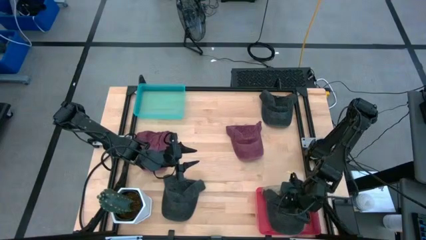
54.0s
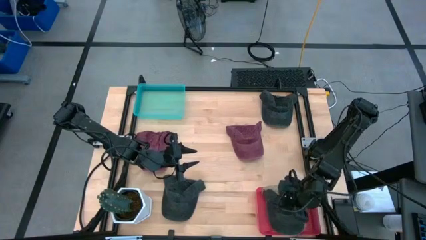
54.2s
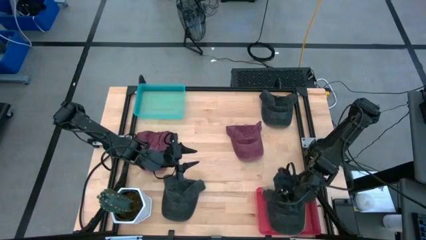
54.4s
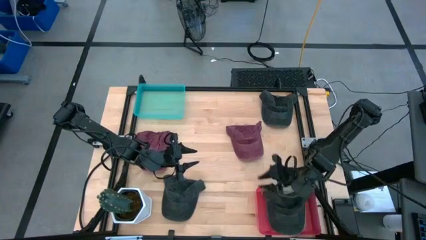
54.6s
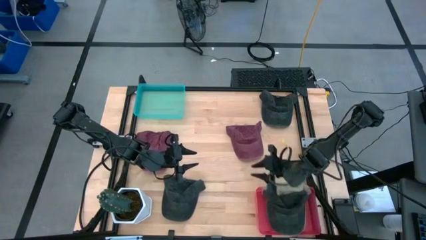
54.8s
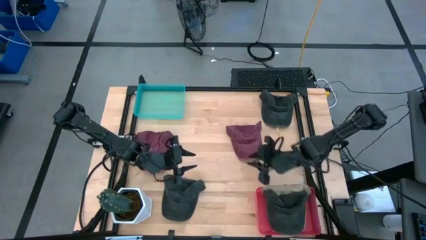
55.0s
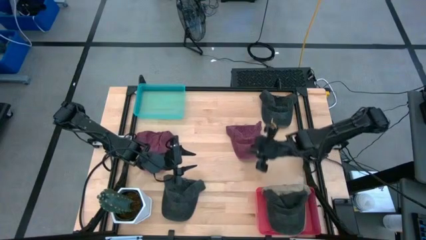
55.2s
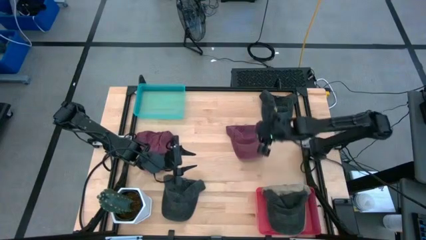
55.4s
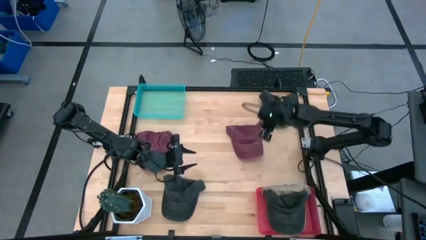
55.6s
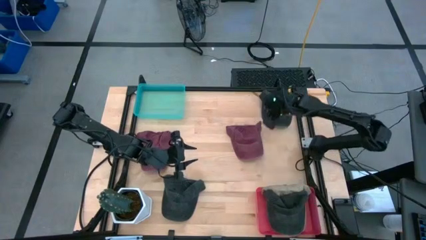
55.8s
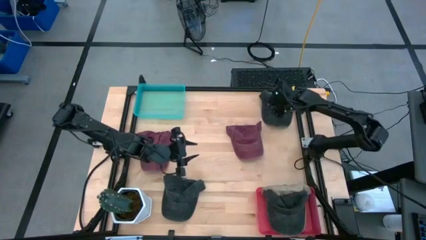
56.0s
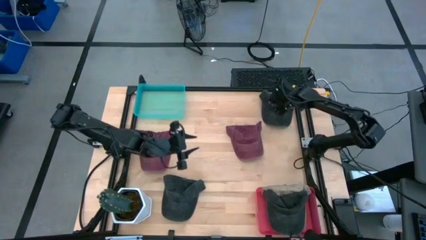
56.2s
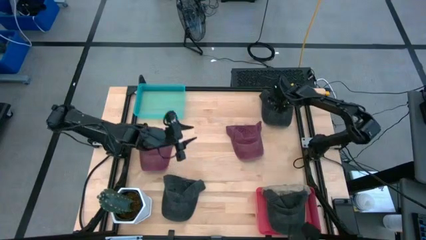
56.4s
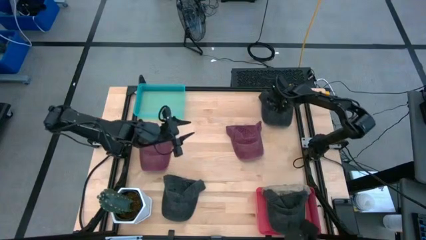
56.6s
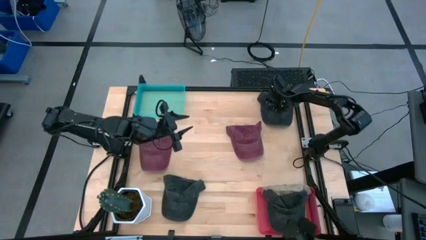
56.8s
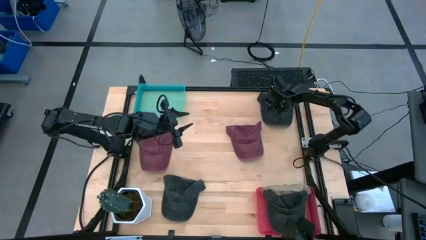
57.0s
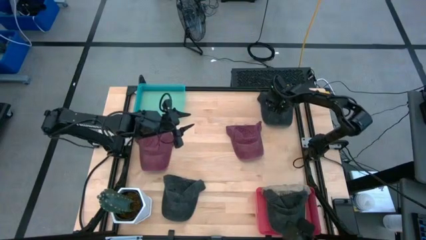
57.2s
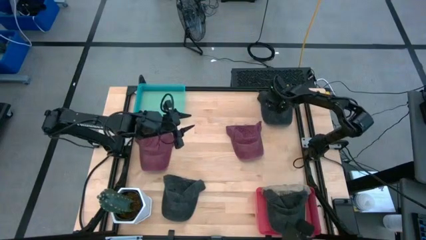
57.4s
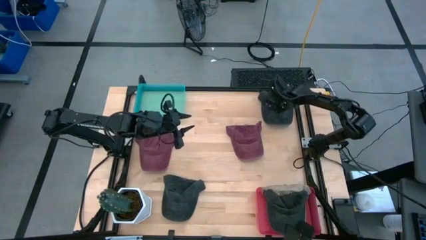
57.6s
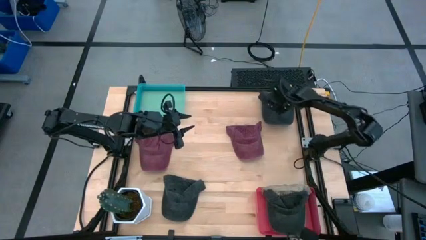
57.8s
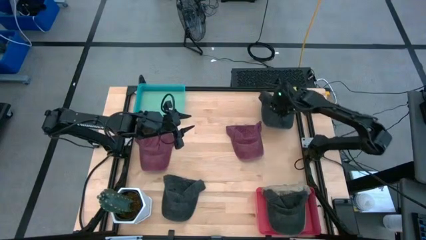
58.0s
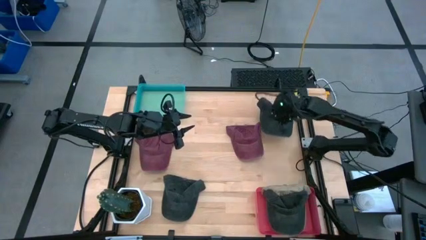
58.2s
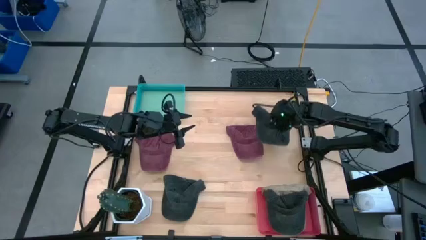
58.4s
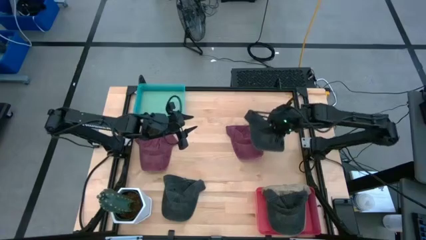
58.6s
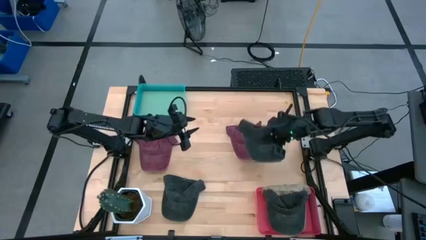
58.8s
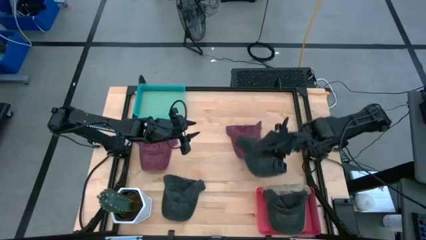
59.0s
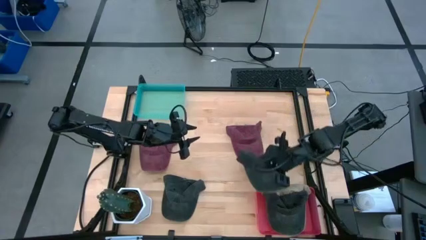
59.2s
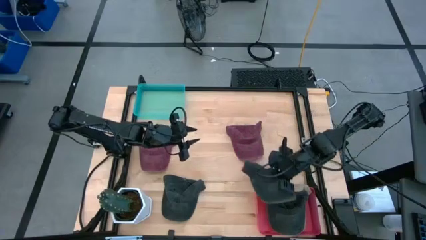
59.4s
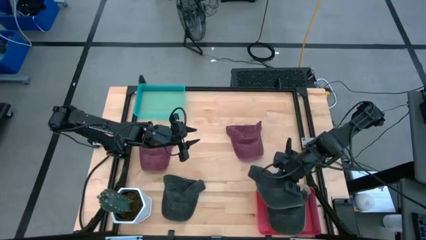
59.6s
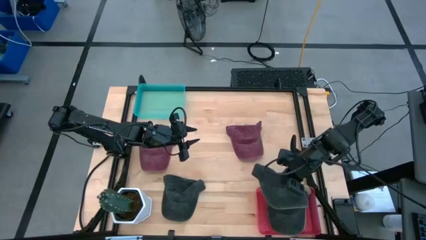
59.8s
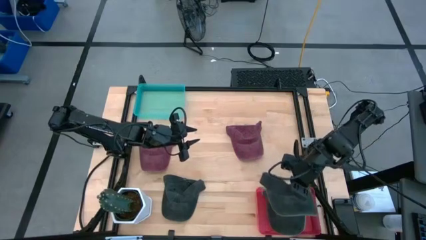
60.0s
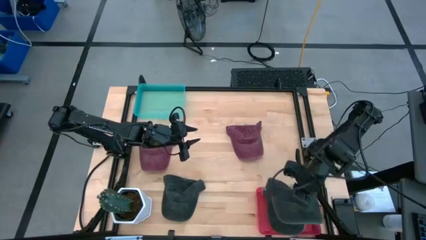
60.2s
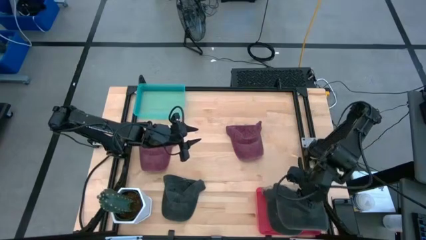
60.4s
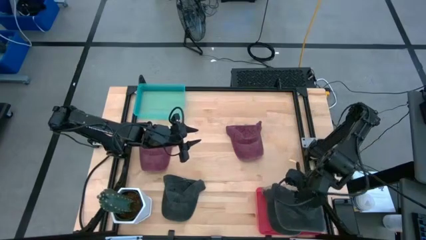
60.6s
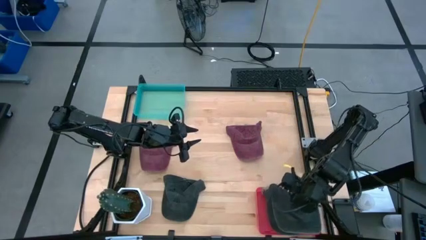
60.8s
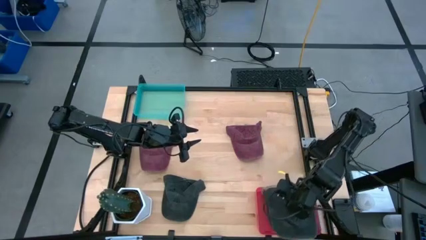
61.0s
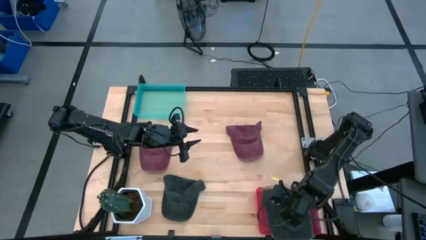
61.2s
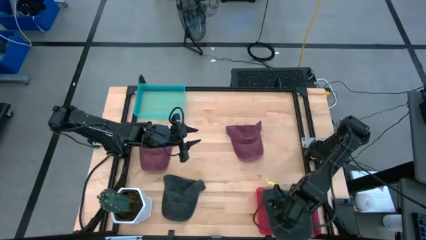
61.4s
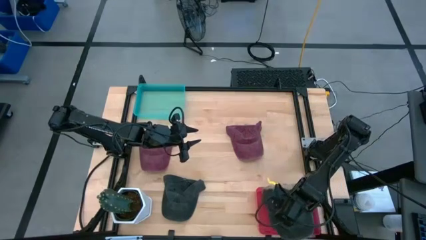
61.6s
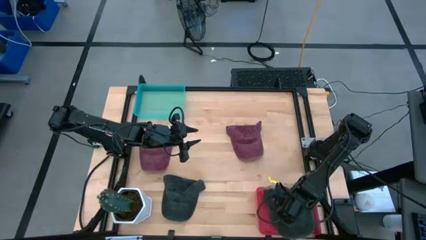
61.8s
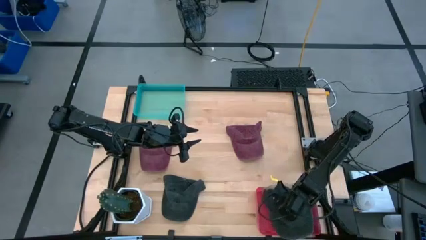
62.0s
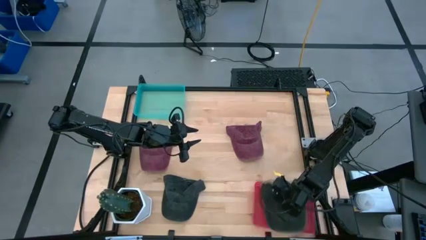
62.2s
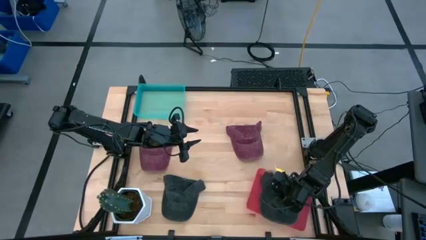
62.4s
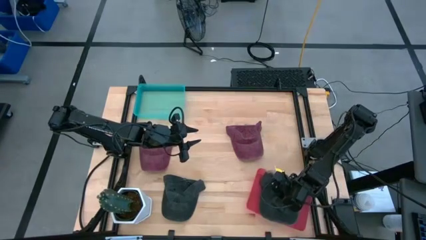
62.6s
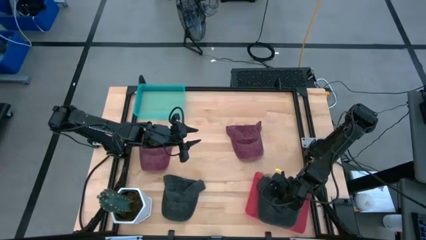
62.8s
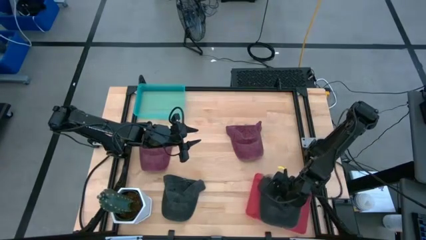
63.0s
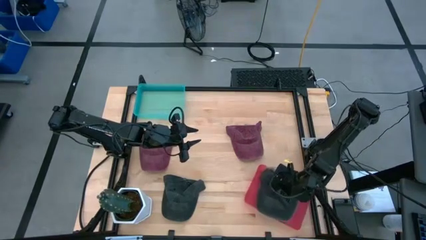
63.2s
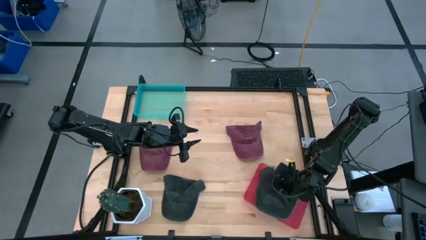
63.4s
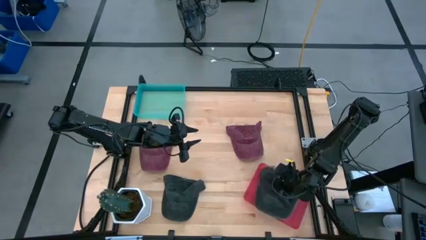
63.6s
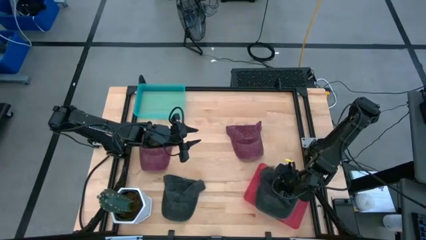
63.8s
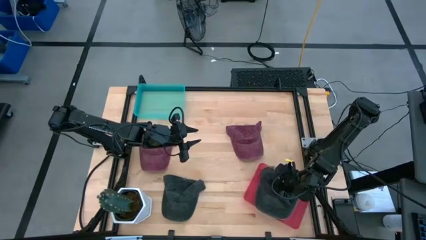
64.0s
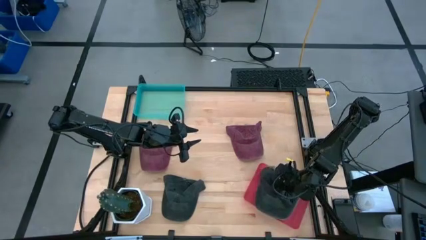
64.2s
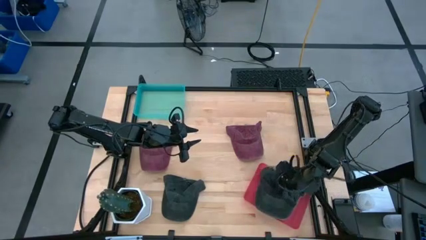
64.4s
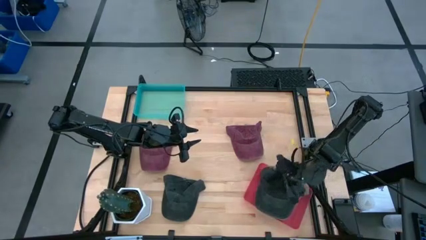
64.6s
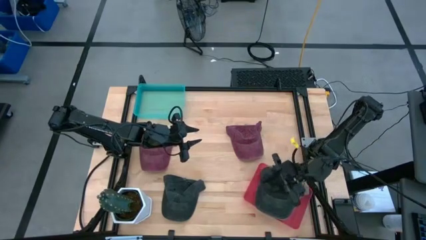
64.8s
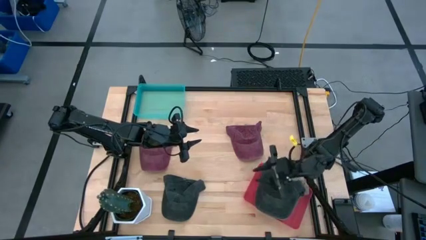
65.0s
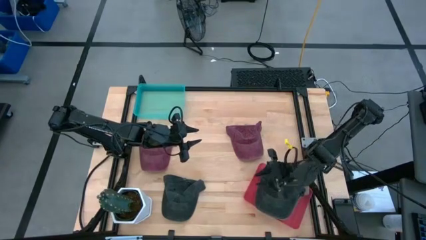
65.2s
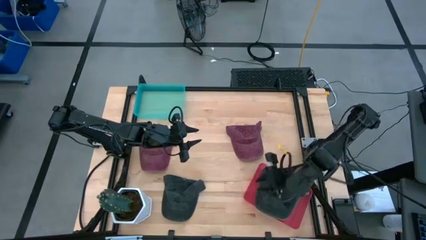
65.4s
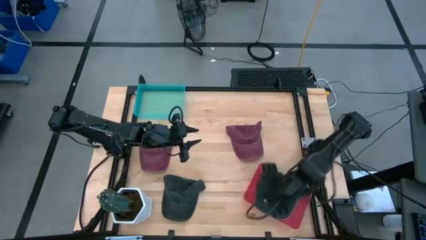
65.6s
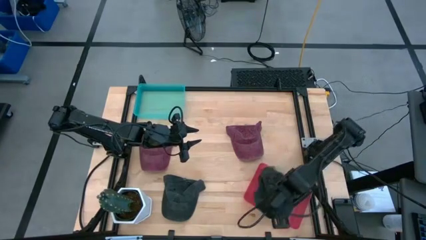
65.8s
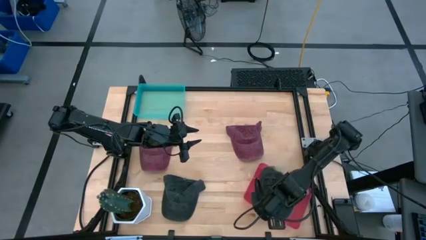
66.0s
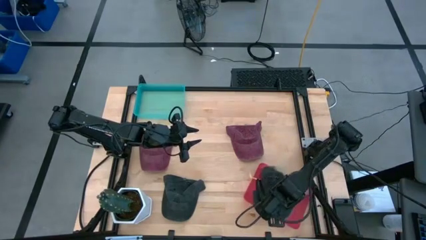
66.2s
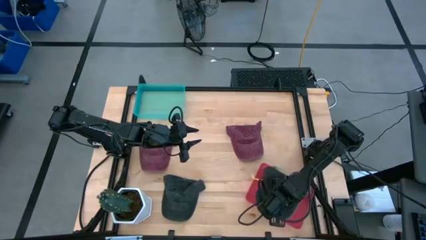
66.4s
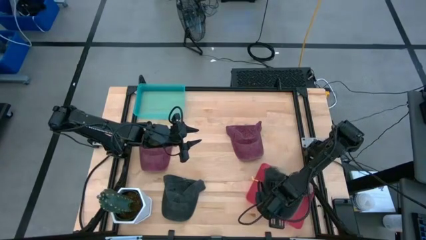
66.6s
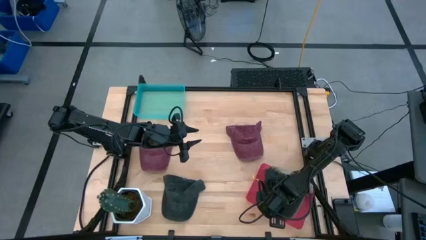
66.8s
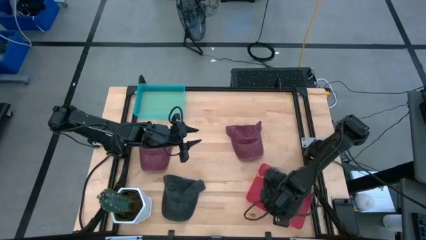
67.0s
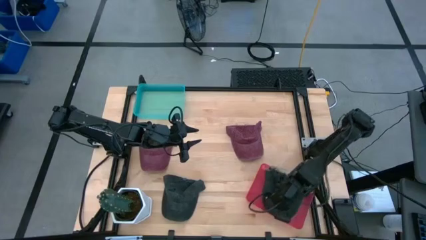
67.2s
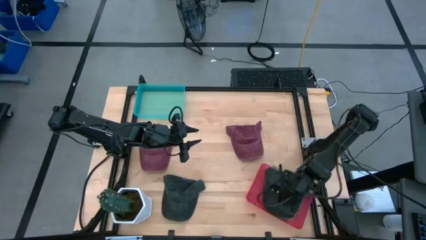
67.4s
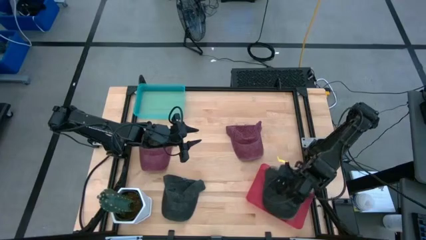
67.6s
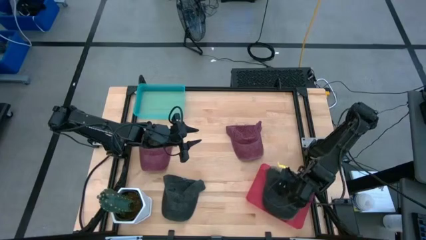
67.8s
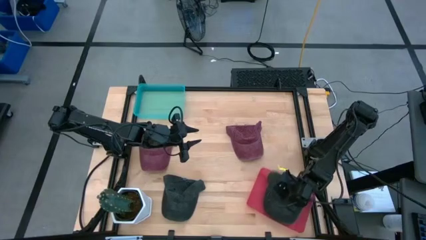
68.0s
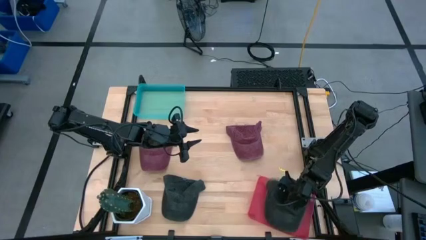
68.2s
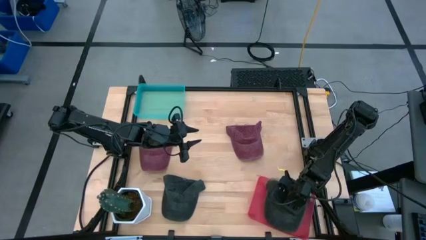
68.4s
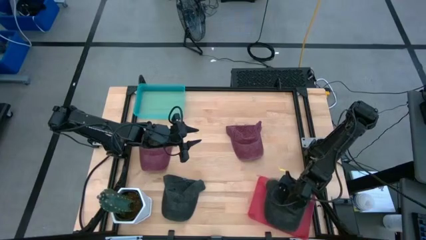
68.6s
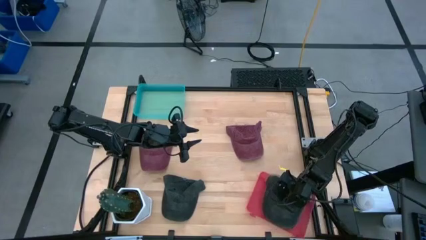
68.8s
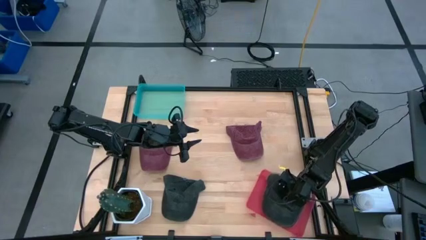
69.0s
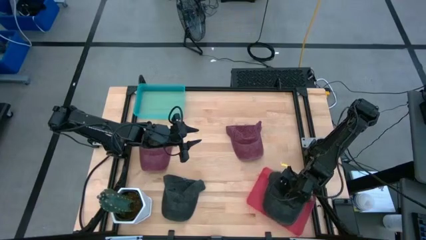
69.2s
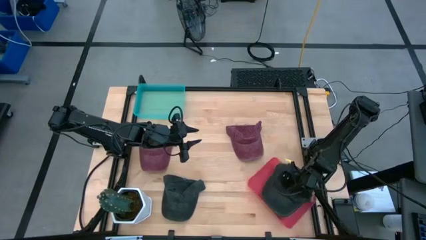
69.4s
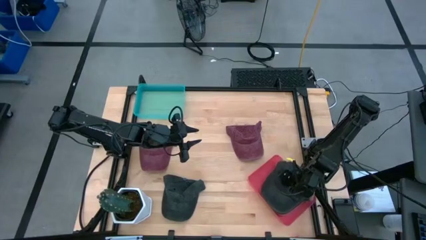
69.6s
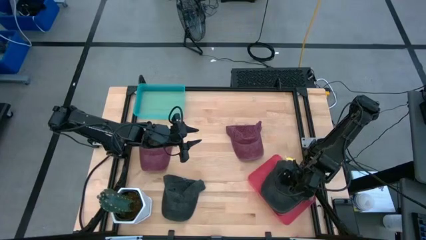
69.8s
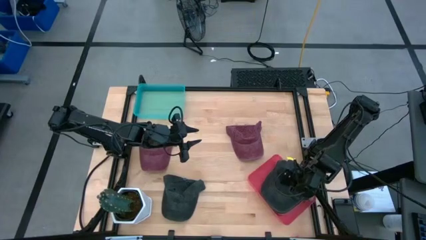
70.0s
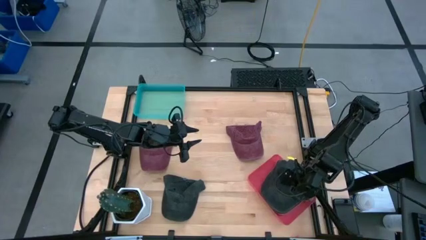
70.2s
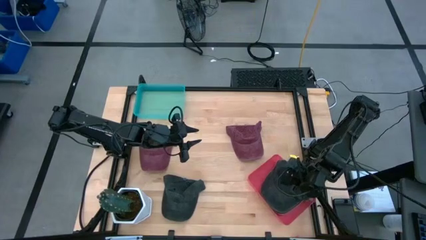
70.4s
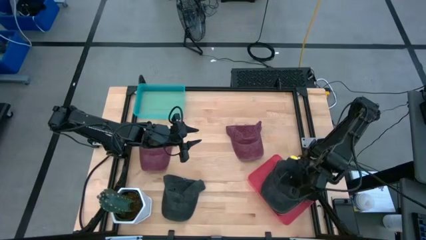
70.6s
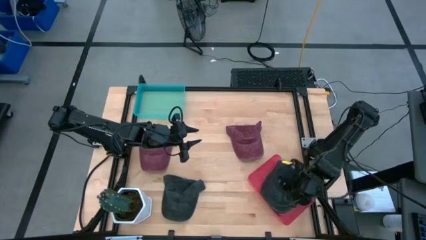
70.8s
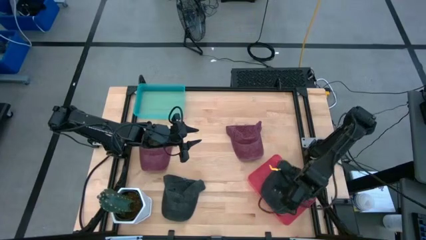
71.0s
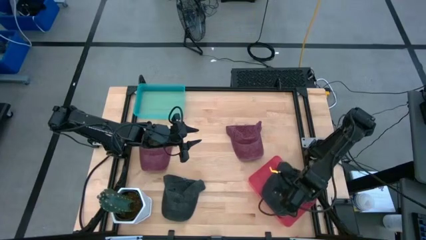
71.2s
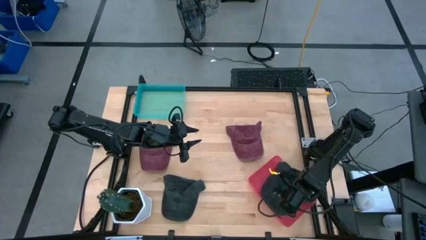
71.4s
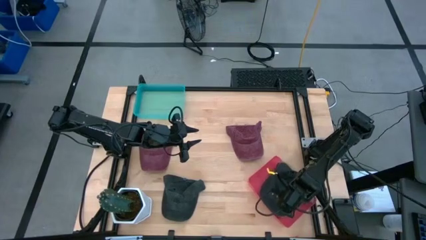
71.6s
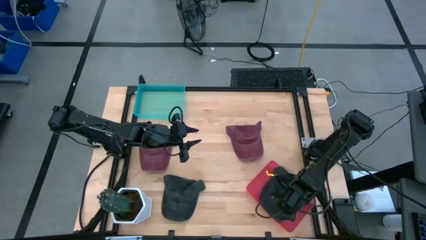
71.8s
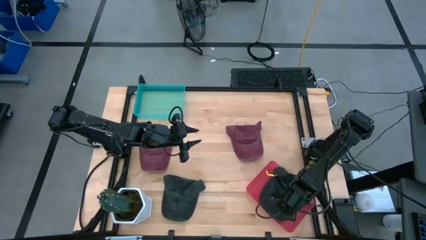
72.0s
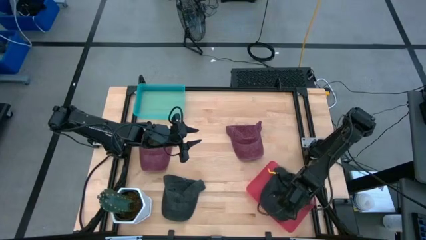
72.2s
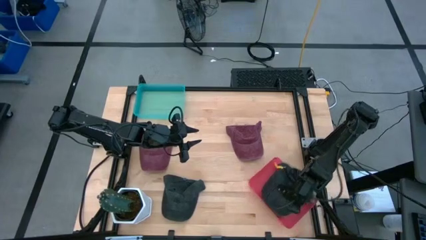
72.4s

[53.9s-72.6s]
Task: Pick & Place hat
Put the top black cap into the pink bin
